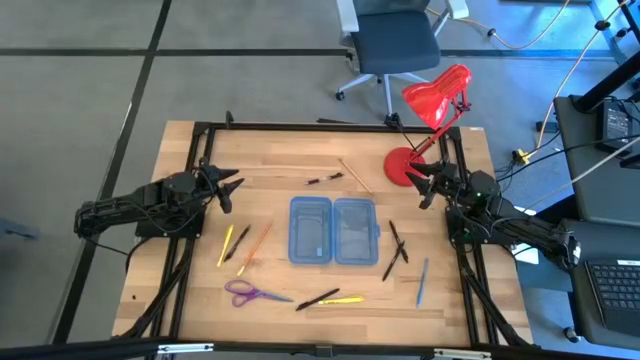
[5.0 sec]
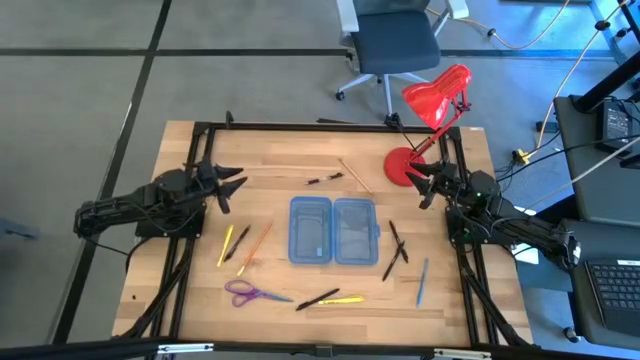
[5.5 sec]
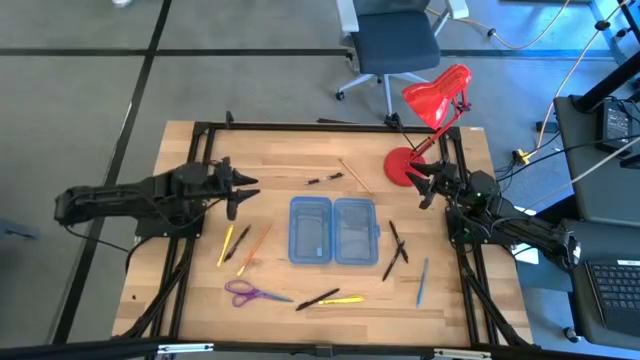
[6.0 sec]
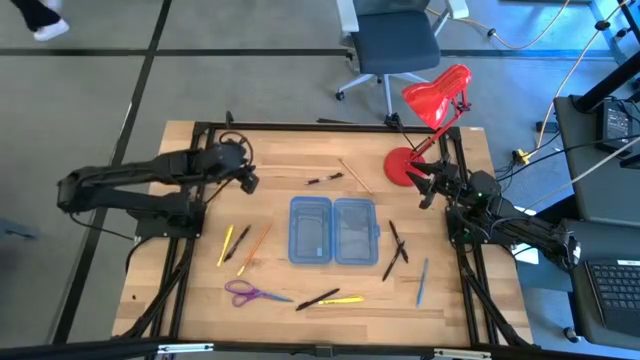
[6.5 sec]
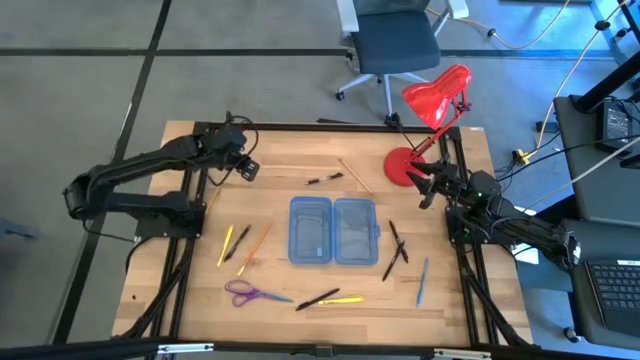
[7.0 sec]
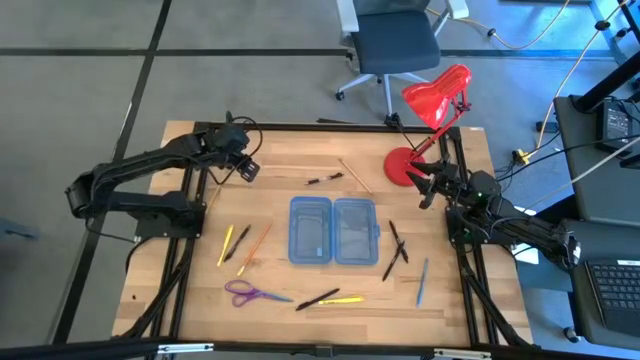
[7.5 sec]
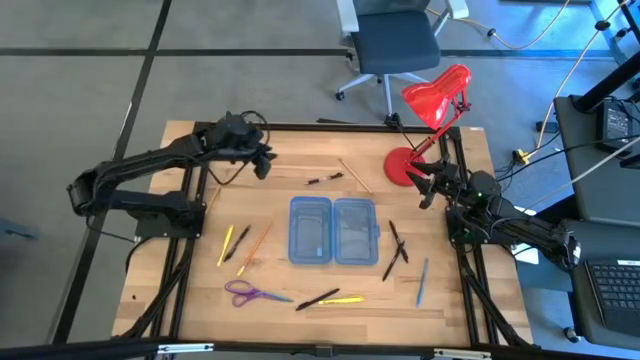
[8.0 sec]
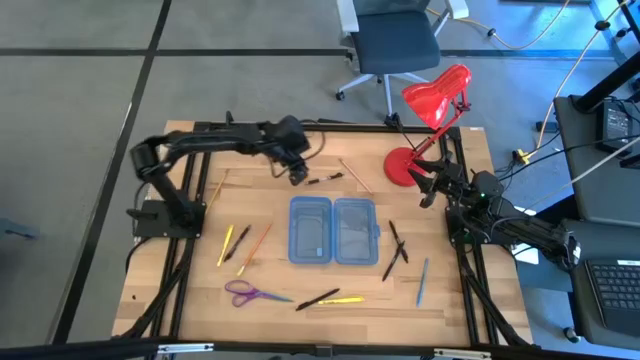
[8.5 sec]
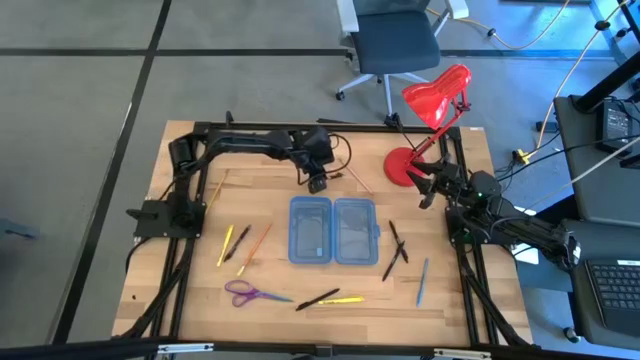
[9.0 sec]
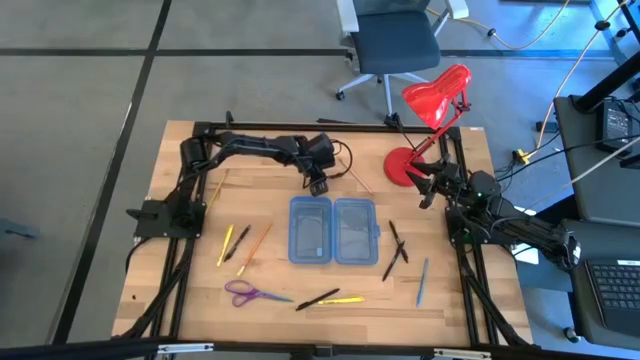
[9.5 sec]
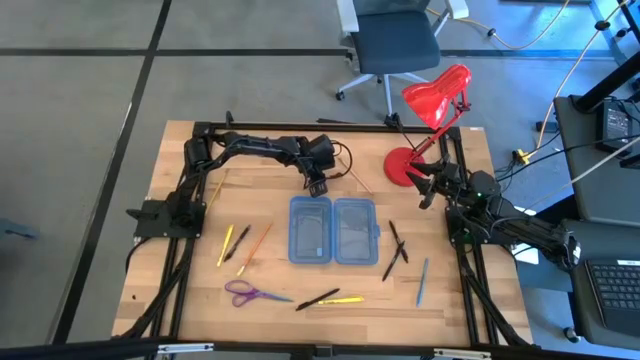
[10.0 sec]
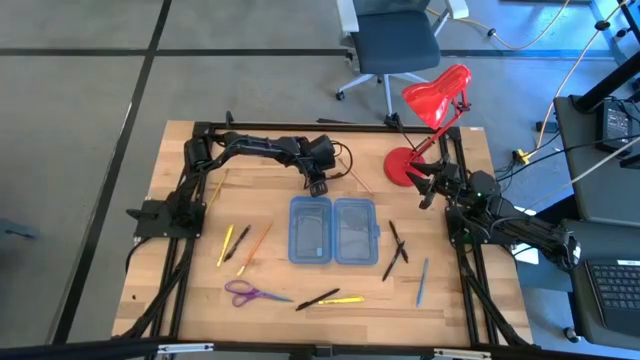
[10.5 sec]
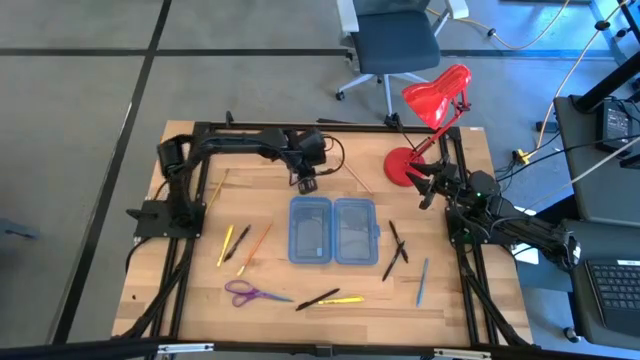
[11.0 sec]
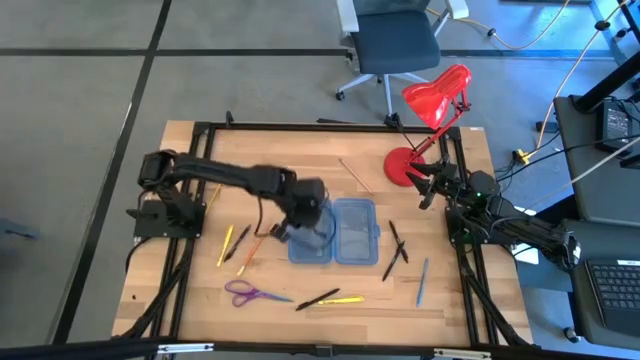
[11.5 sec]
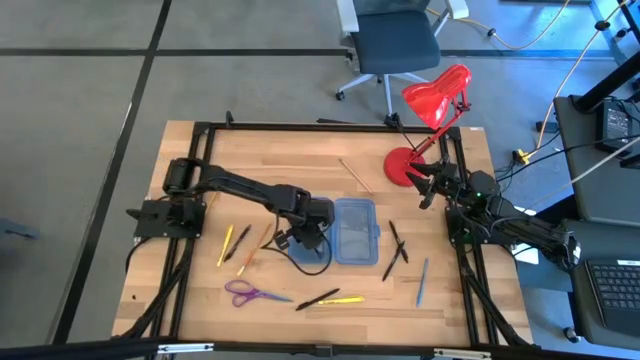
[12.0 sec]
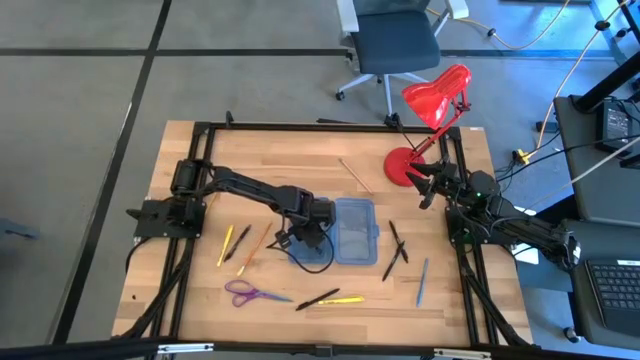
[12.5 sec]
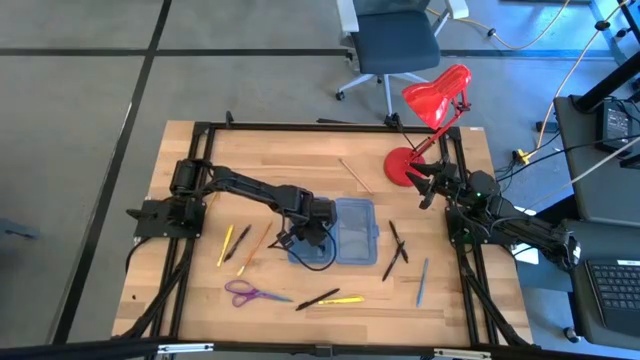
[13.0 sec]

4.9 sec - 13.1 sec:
Task: Pick & place school supplies into a supply box
Put the black pen into the blue supply box

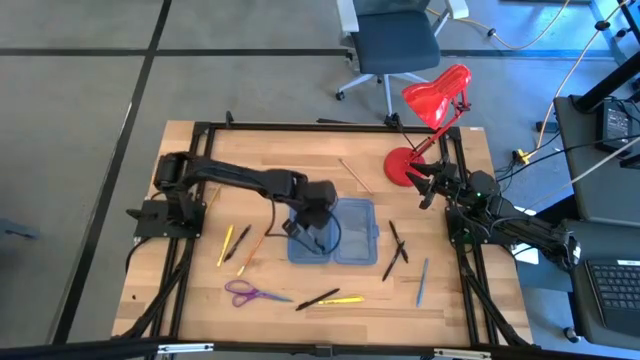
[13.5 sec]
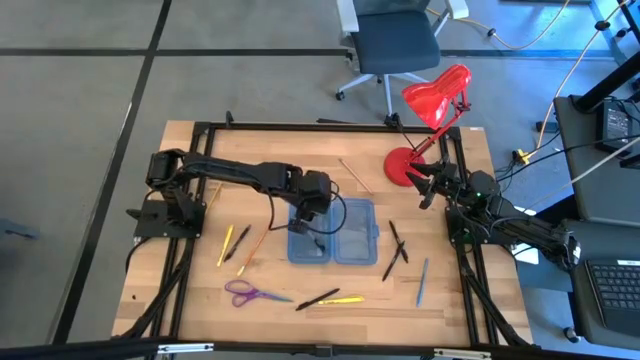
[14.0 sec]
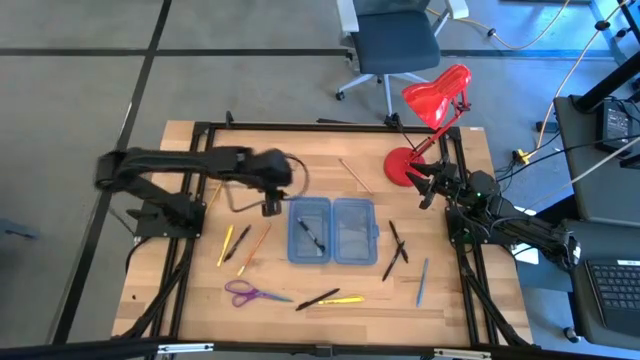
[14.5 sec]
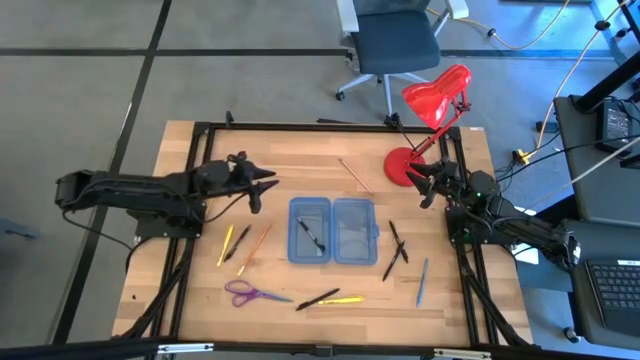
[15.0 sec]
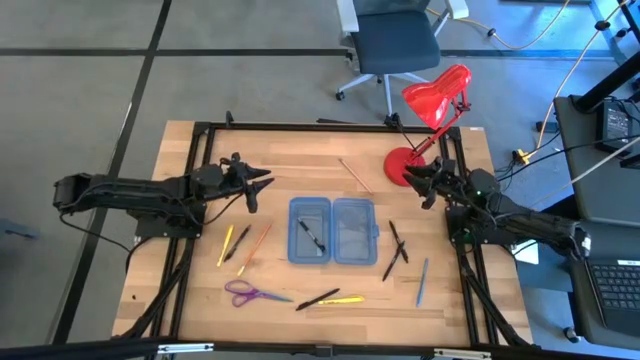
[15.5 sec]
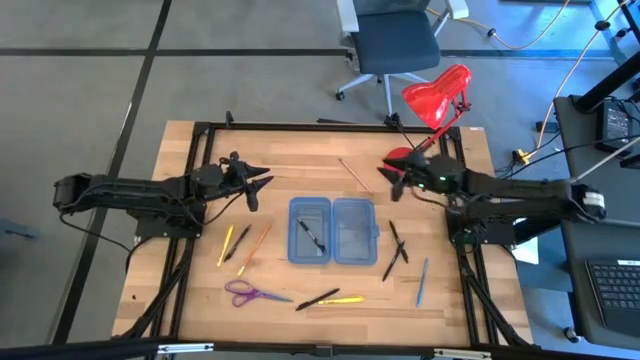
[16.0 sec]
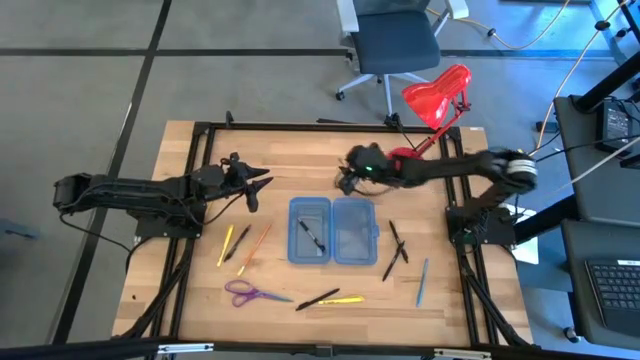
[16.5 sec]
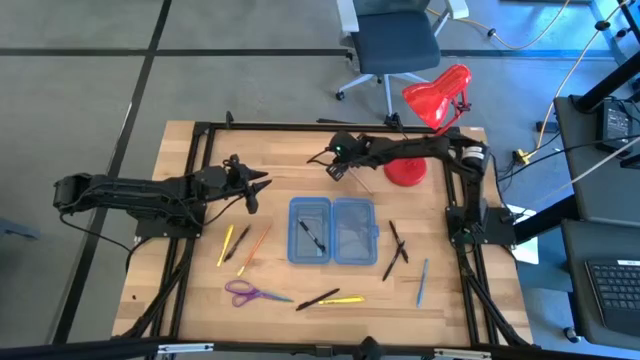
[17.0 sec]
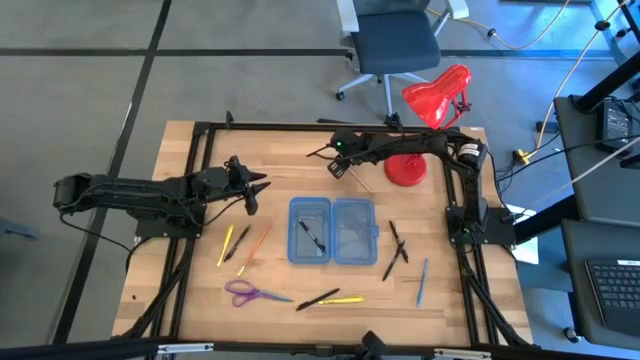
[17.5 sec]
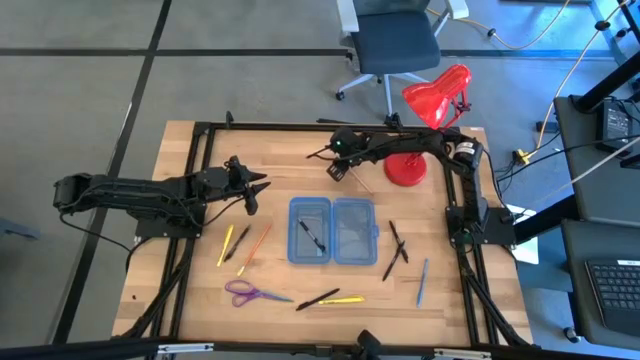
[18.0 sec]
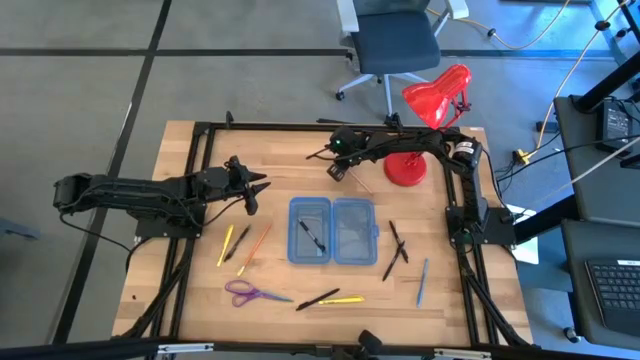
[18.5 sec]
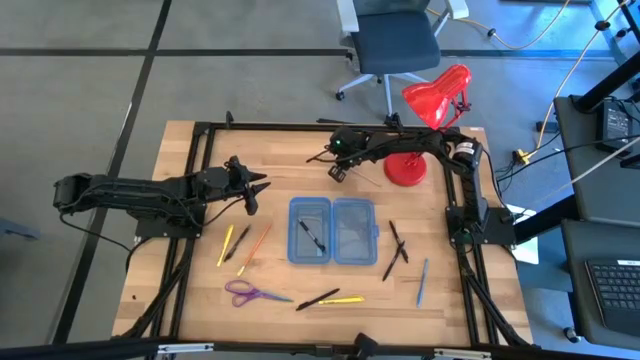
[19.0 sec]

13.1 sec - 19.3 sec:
Put the pink pencil into the blue supply box

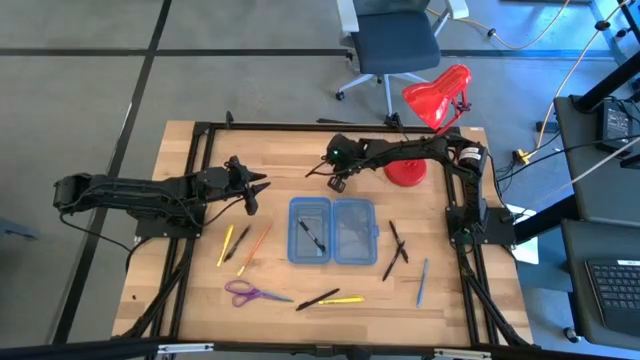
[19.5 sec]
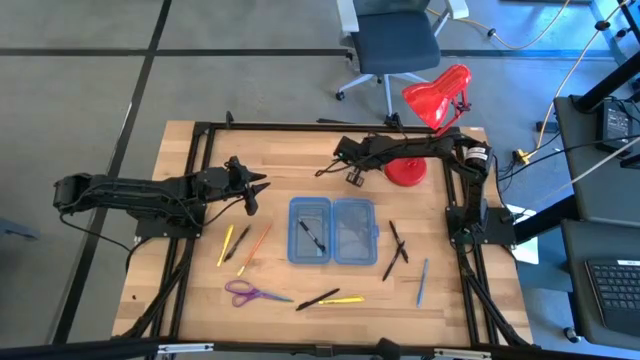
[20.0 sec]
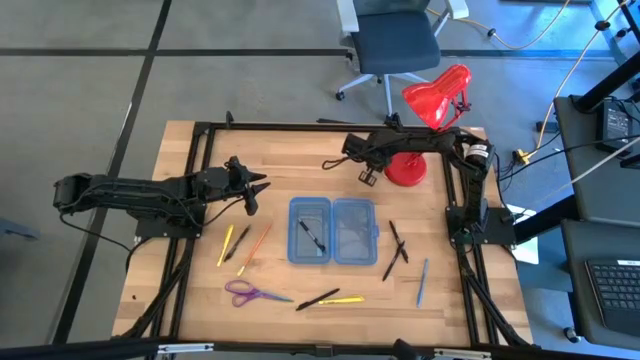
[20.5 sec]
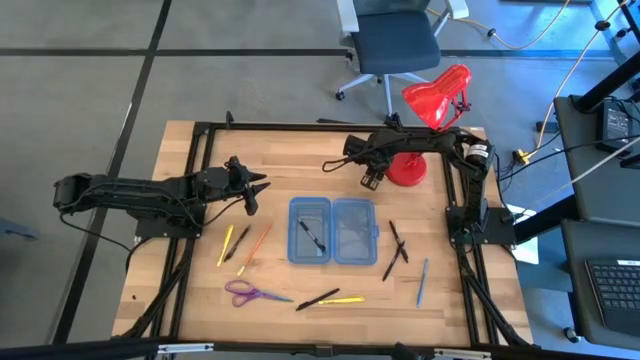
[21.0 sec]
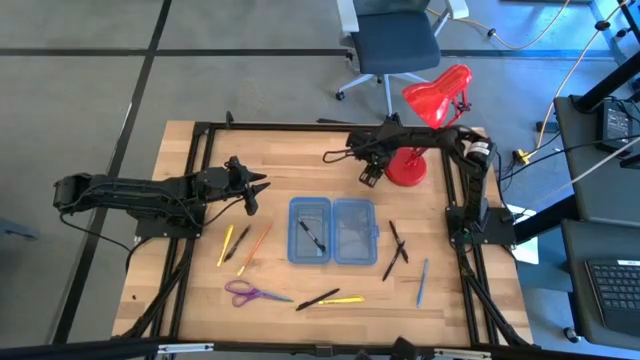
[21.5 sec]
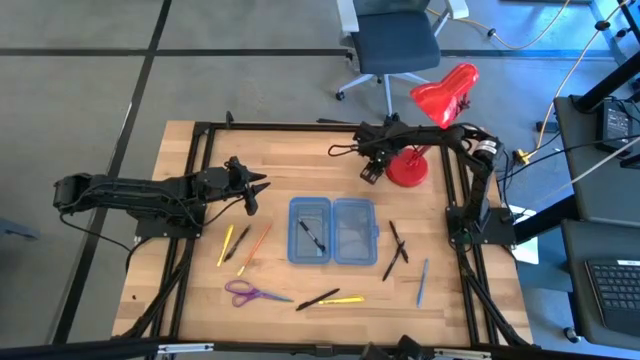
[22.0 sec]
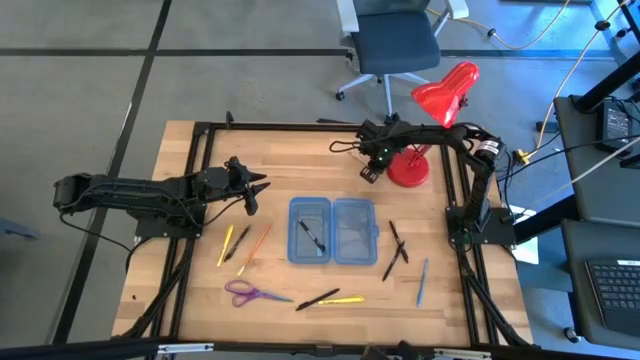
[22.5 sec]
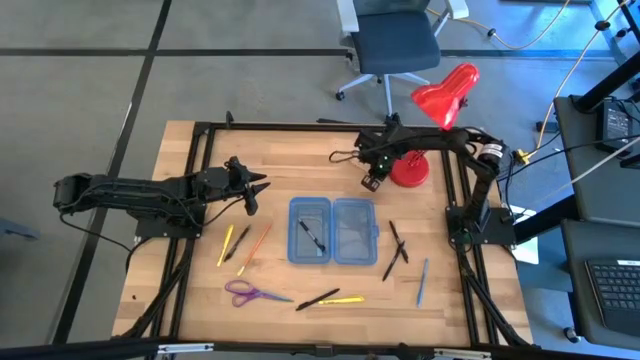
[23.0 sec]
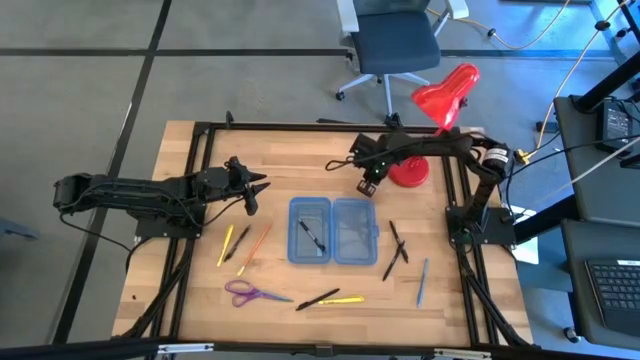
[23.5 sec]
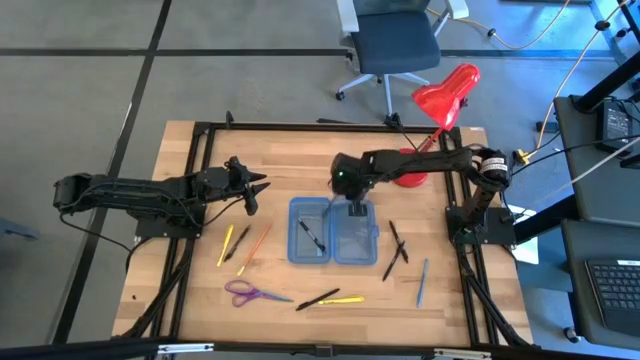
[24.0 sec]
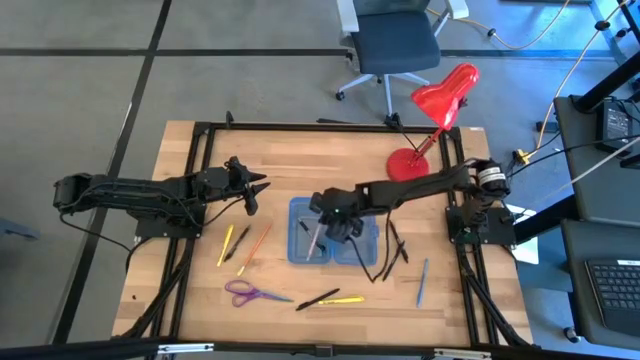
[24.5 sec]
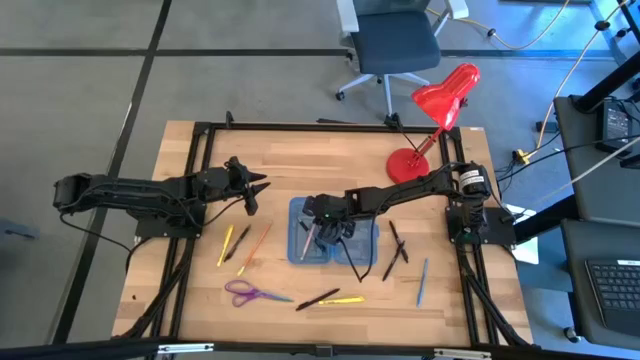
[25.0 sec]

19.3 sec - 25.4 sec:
Put the pink pencil into the blue supply box
